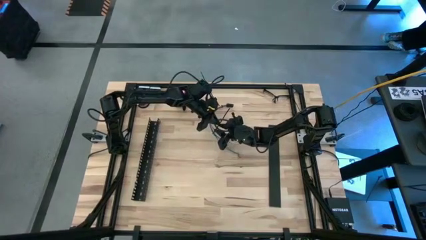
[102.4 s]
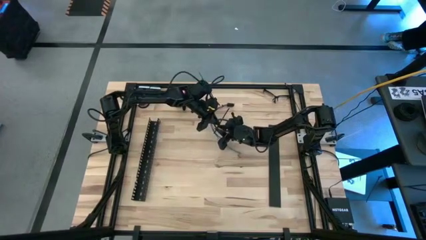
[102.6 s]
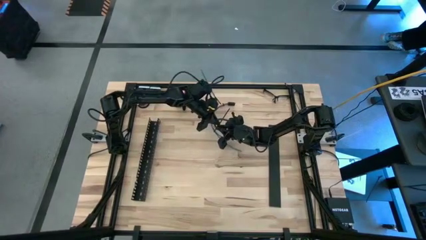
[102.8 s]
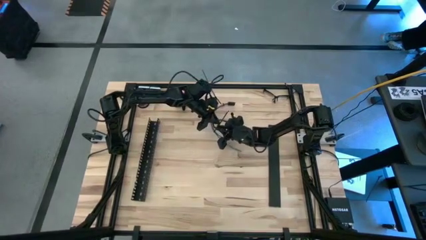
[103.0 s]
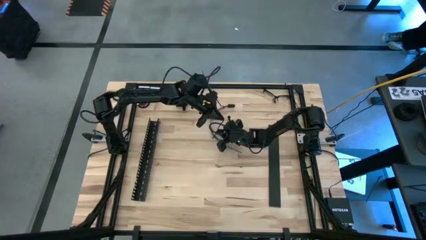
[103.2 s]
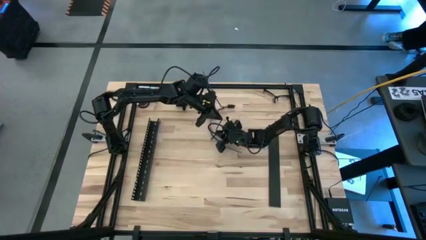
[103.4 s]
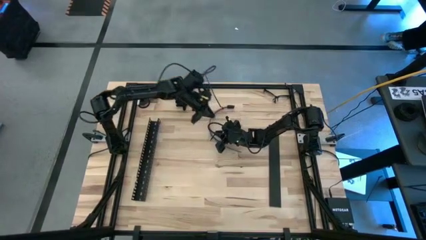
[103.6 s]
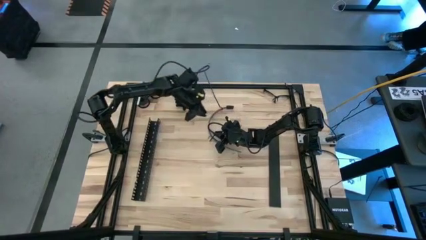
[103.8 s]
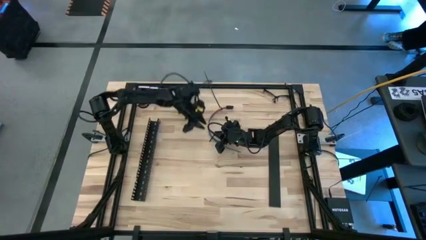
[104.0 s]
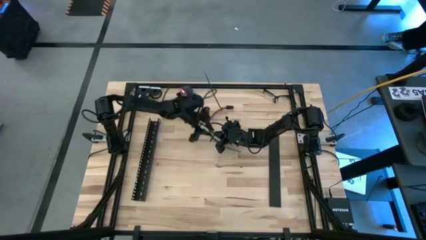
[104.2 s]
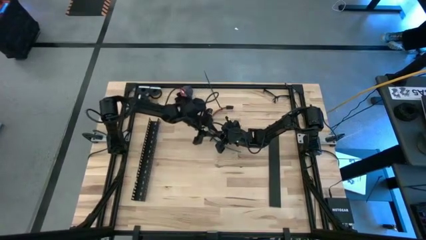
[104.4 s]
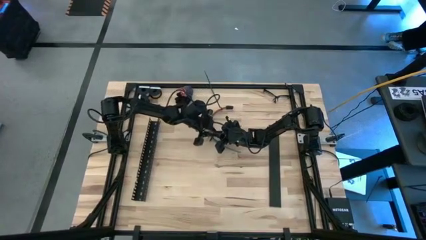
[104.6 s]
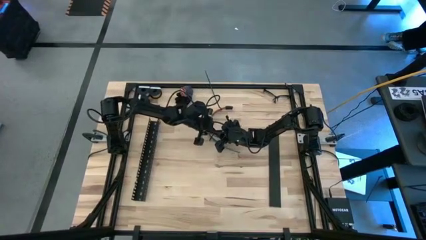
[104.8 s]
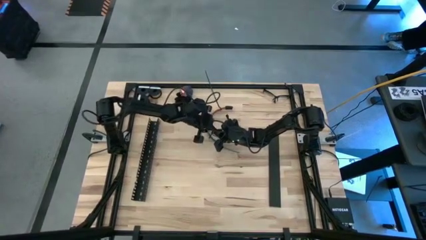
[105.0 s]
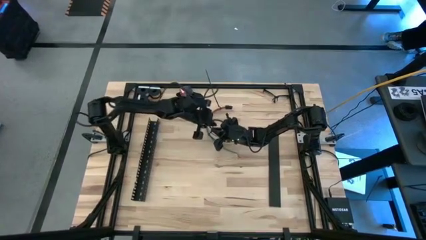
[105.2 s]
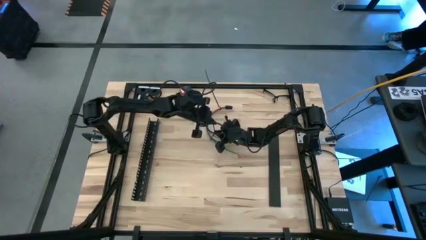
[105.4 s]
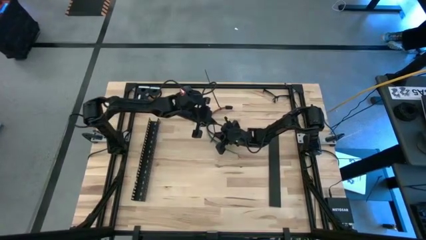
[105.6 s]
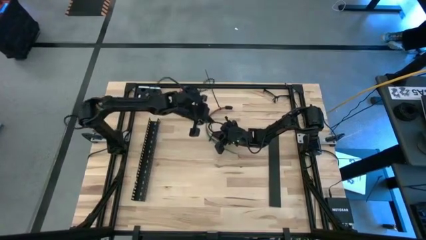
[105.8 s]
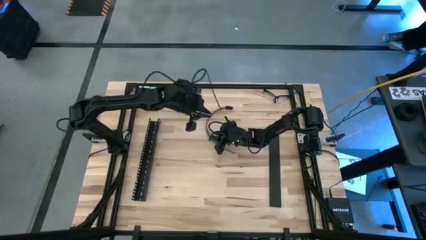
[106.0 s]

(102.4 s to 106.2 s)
Task: Ziptie cables
Wrap the cable wires with the black zip tie

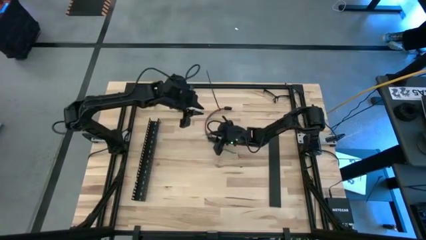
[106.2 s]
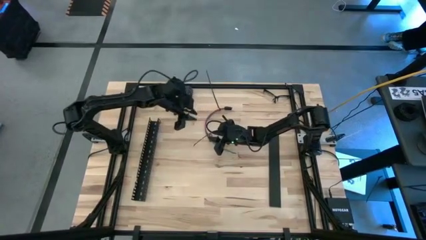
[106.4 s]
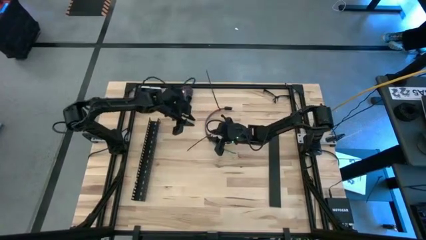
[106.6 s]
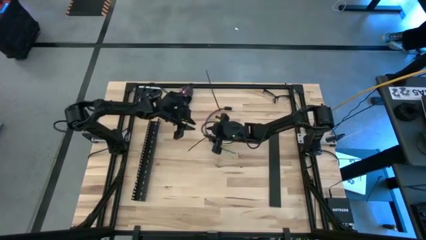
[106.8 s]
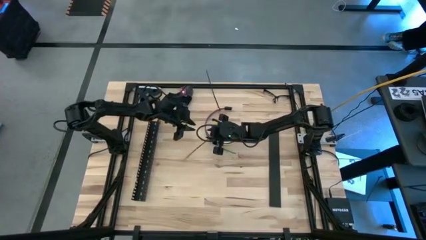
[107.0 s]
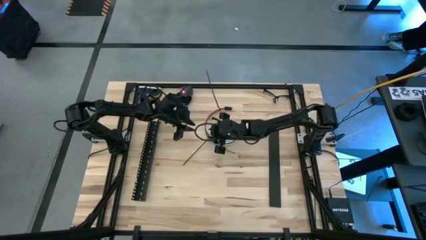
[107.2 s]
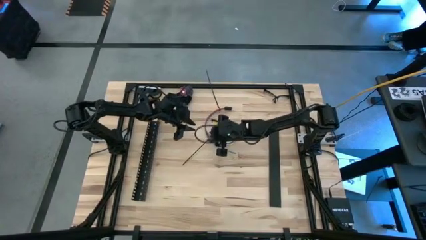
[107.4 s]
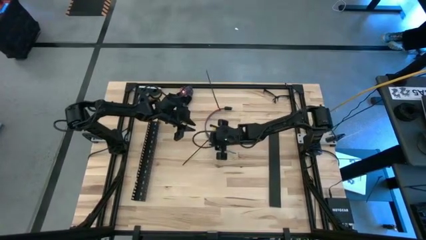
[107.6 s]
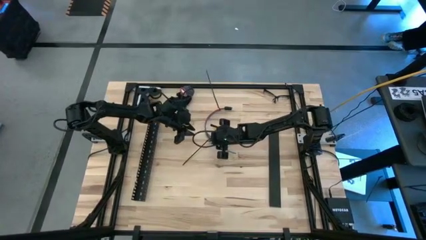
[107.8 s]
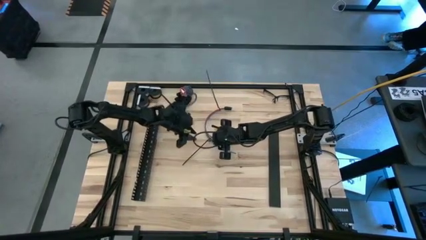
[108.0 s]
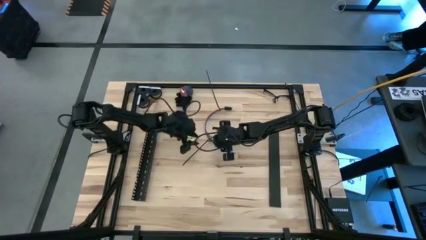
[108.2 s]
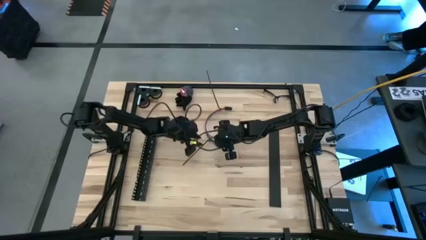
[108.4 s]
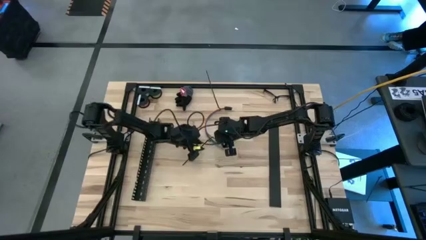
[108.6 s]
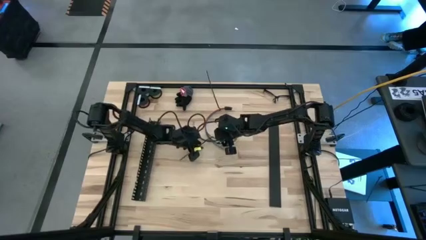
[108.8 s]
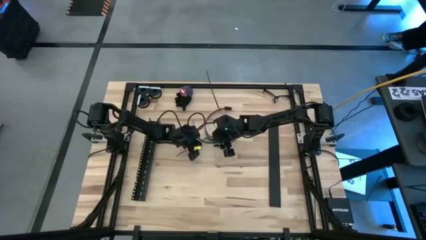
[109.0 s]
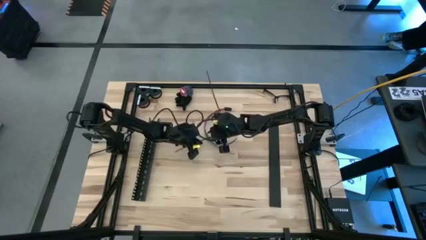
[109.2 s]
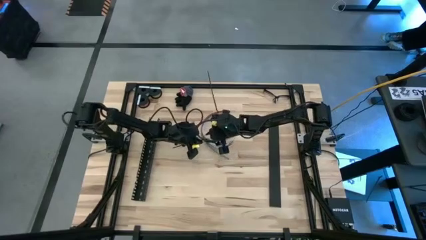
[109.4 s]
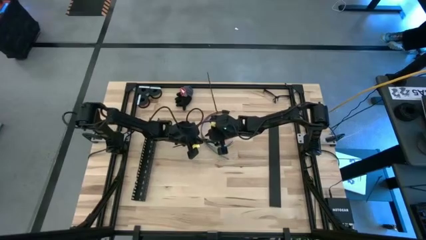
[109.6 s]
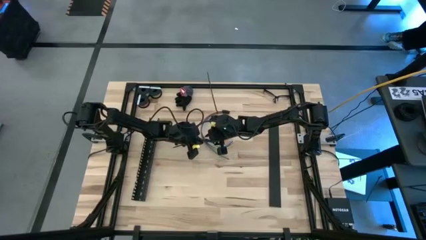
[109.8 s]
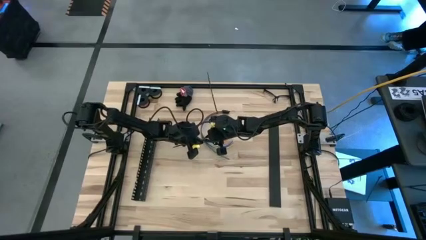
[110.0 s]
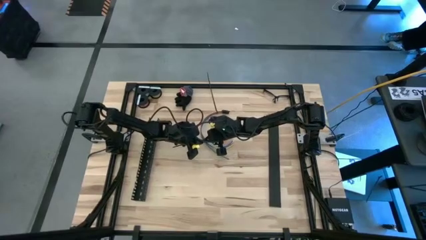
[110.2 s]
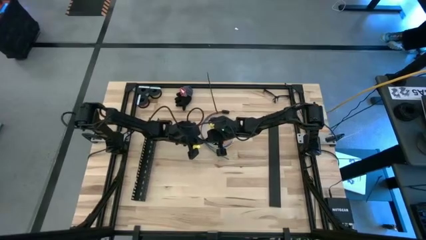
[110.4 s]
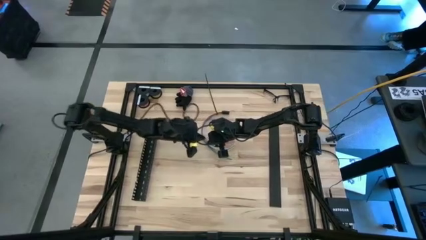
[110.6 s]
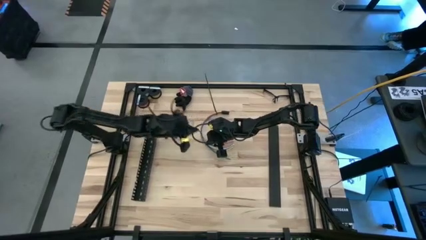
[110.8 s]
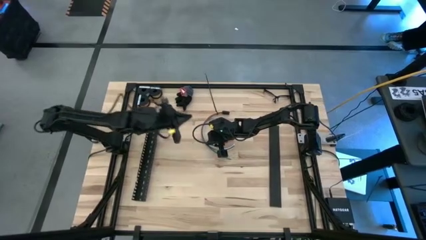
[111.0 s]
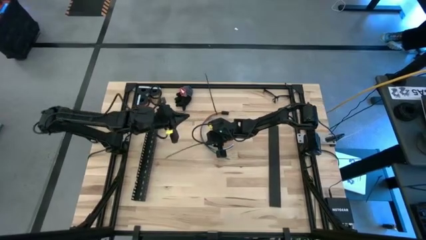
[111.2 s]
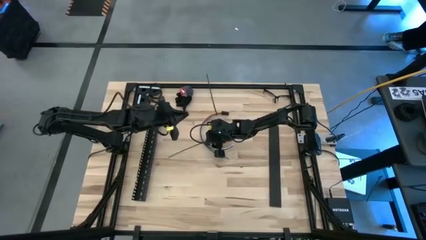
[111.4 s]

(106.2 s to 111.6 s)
Wrap the cable wires with the black zip tie
